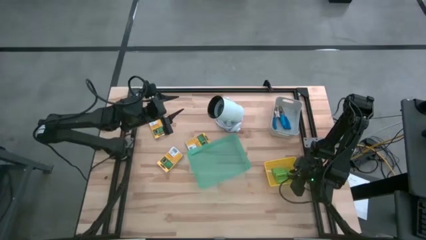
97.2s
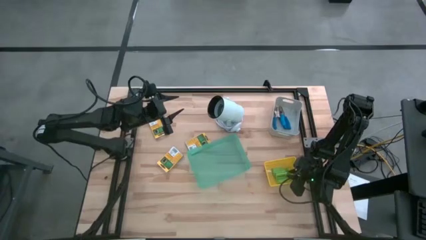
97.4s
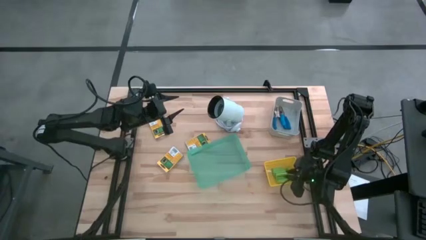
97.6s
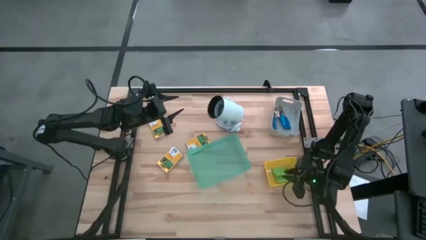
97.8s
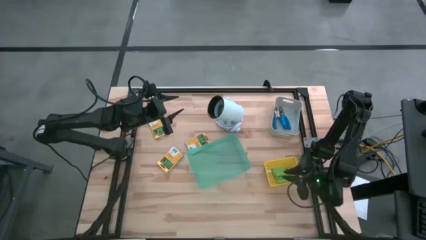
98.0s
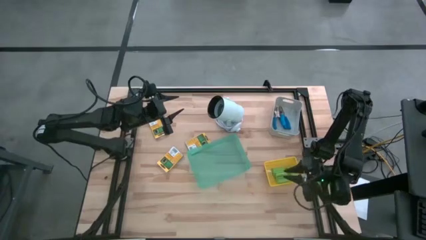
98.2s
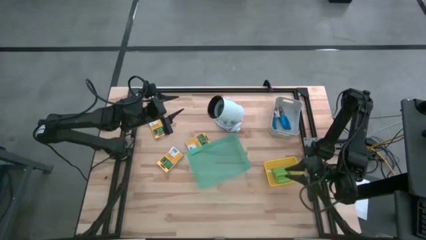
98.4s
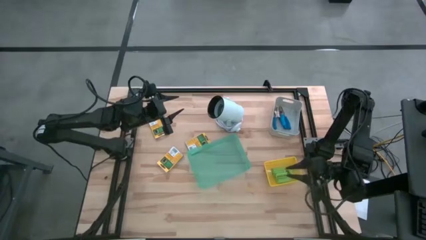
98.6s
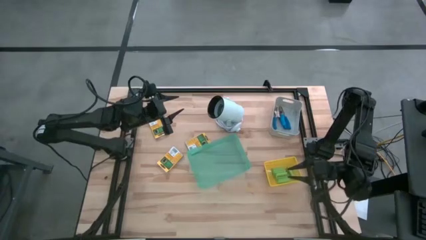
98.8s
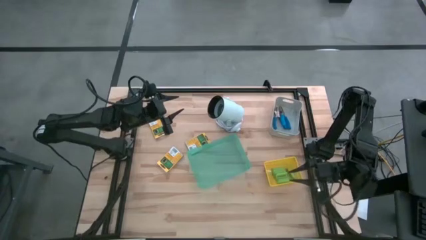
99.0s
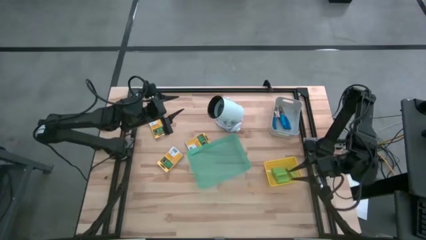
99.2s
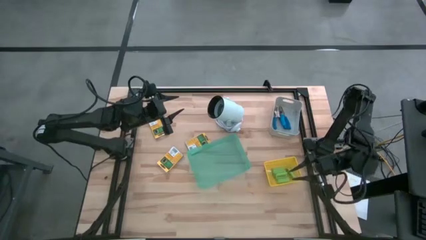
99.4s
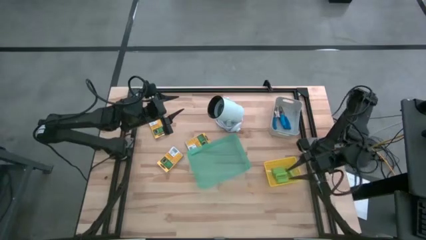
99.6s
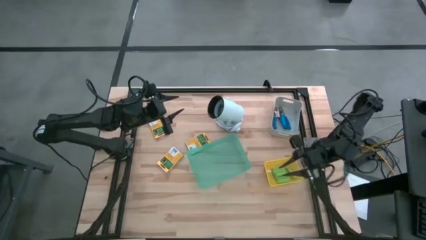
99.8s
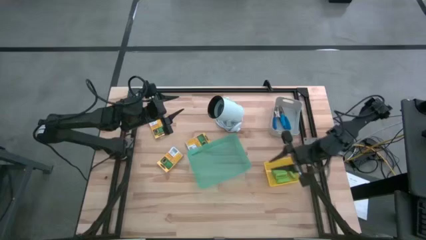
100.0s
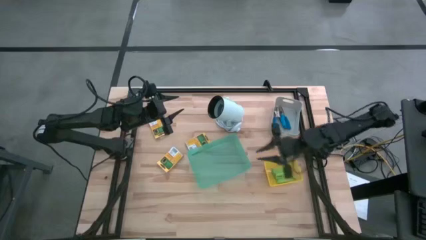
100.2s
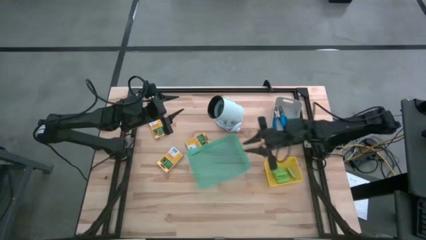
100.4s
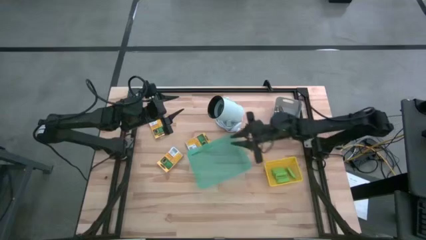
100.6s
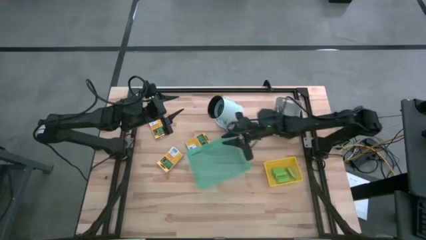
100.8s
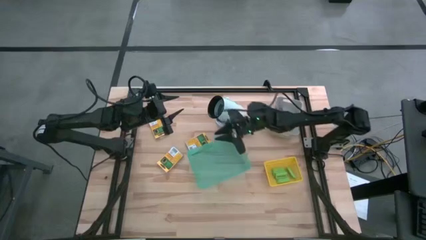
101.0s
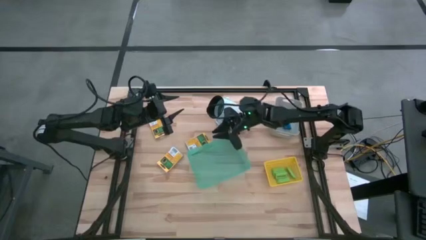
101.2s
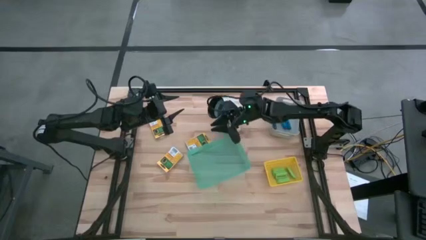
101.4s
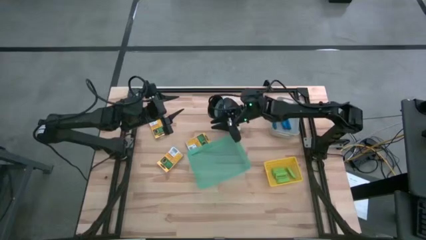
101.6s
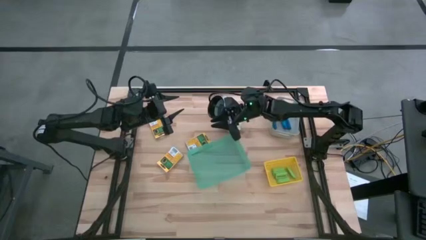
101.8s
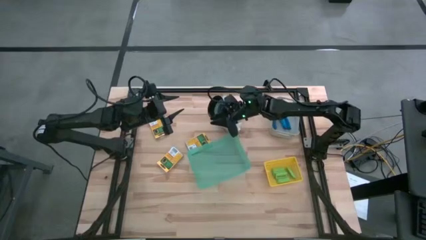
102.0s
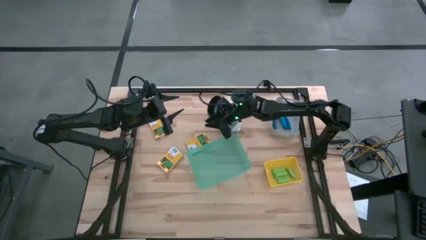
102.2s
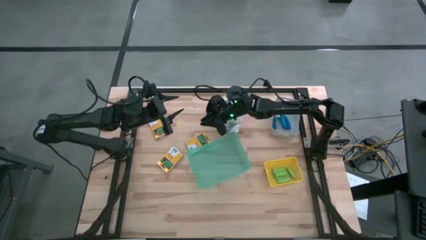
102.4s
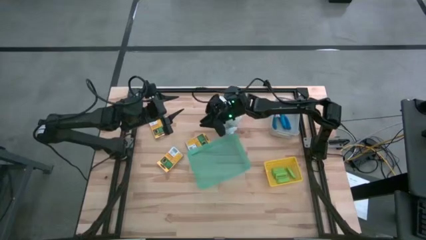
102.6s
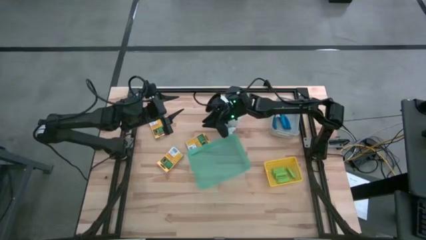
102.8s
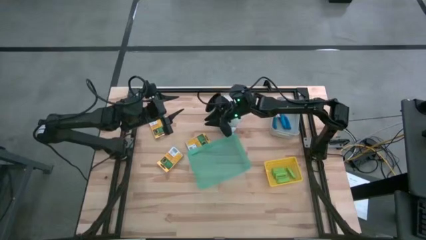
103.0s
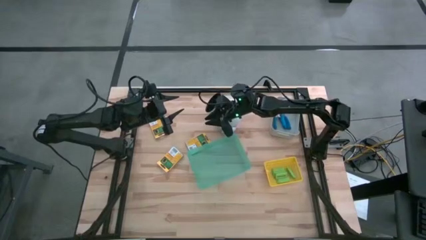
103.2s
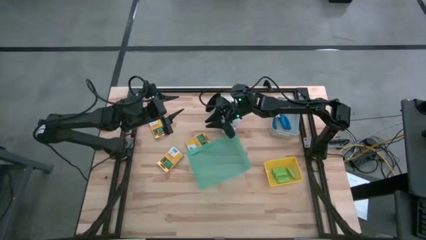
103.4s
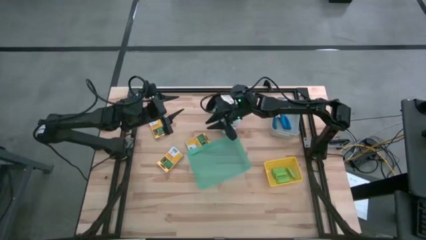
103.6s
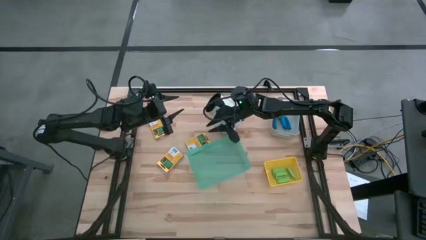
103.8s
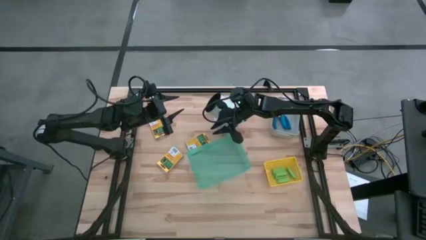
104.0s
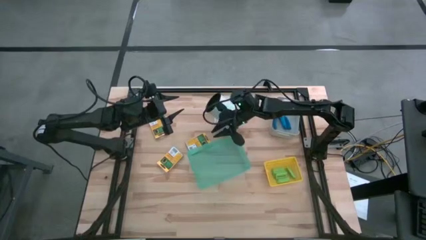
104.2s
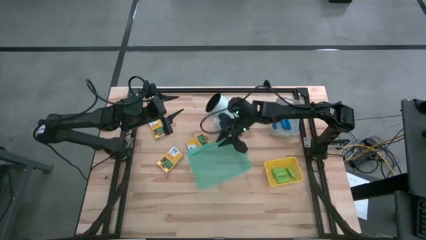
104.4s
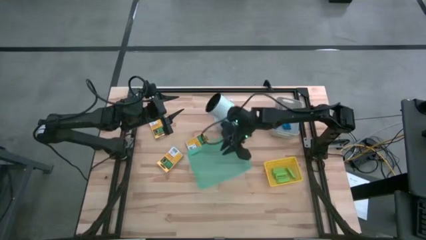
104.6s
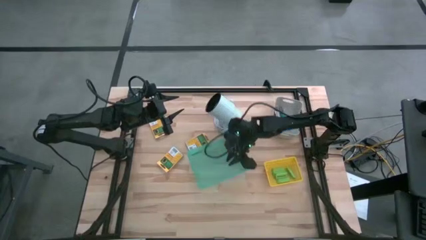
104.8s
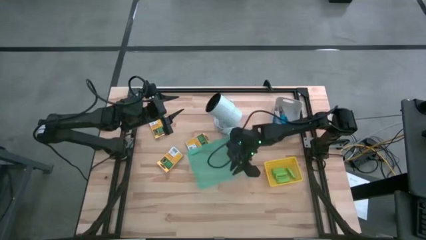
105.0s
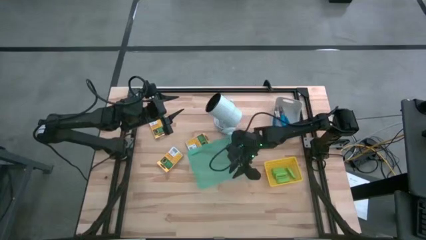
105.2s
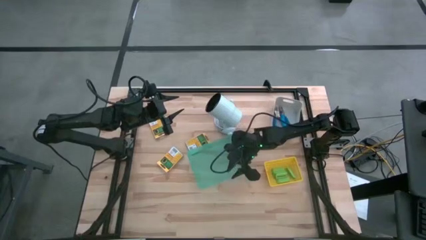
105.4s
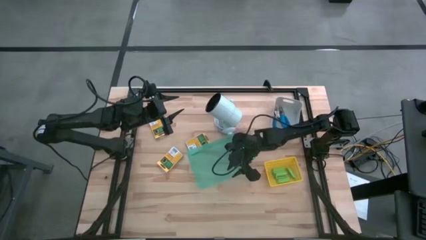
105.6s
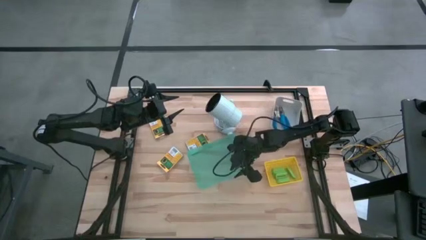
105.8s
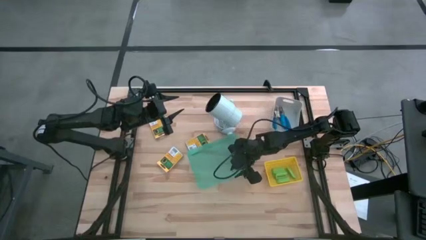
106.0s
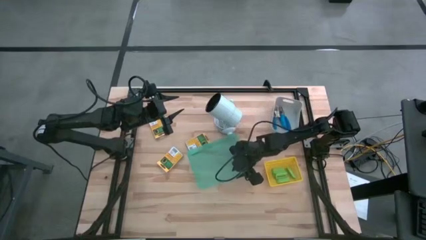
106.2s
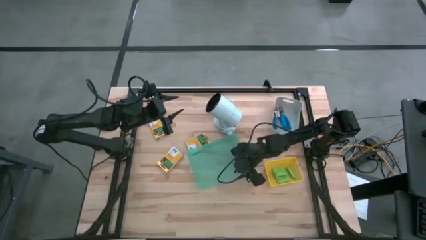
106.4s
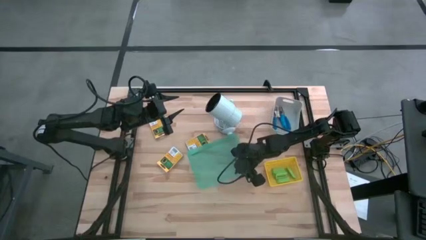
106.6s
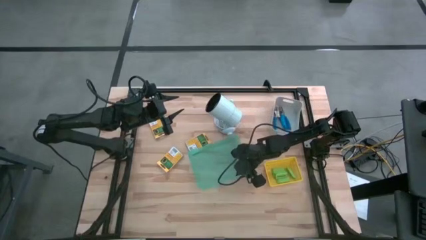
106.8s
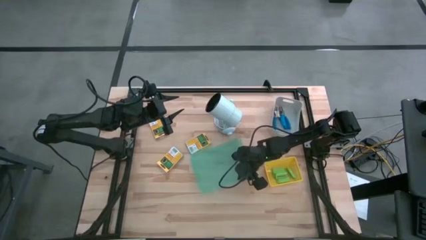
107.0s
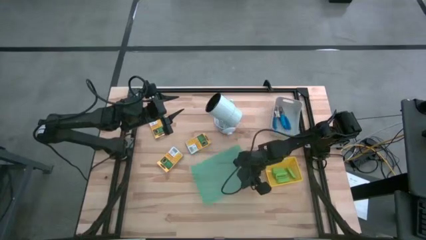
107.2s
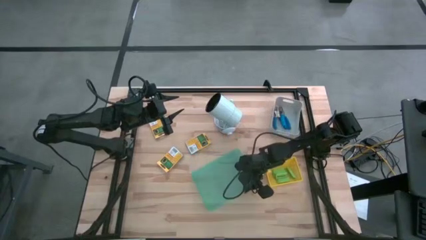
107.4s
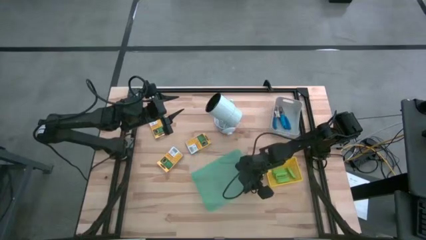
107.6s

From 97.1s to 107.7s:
Task: Pick & Place School Supplies
Adjust the green bin

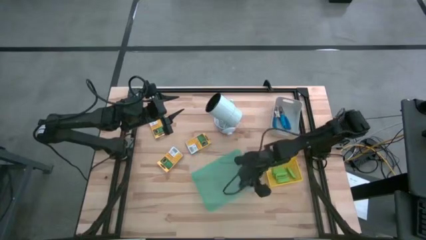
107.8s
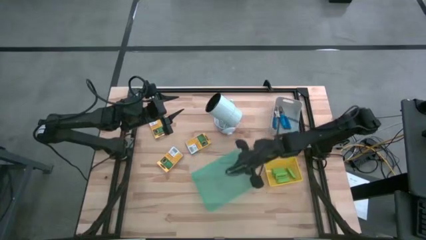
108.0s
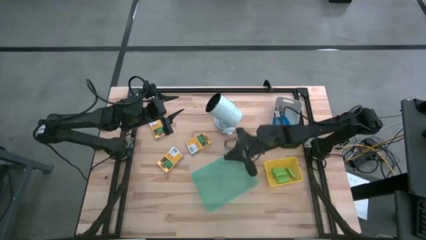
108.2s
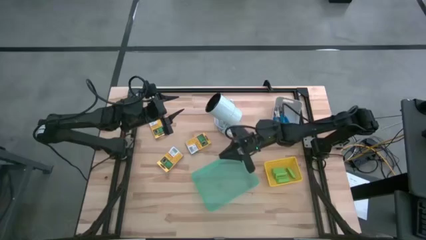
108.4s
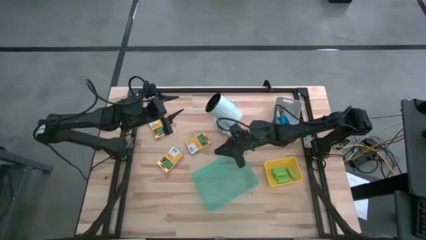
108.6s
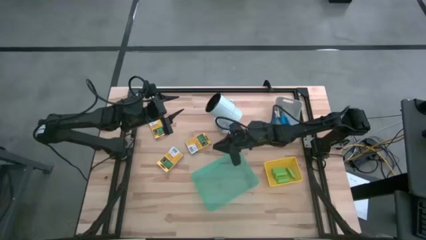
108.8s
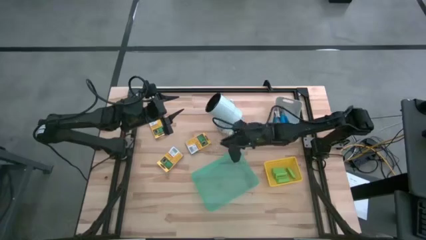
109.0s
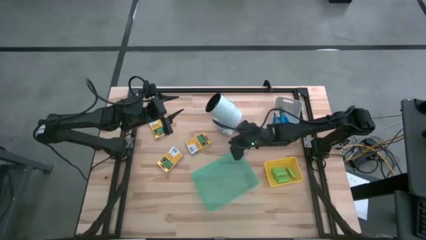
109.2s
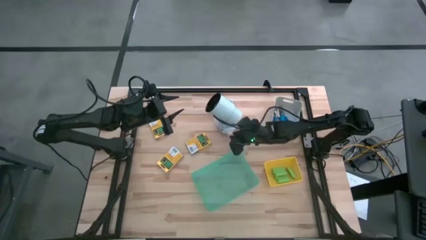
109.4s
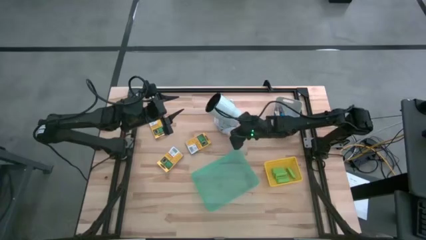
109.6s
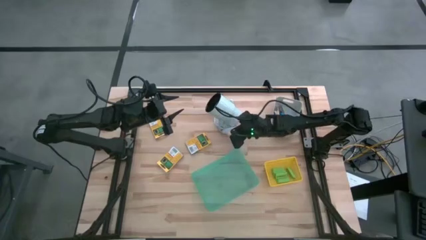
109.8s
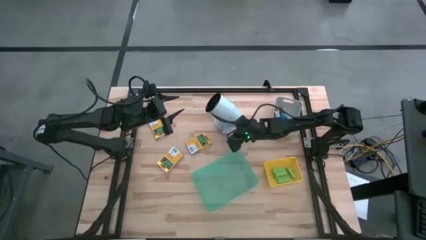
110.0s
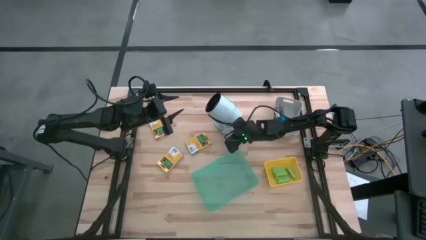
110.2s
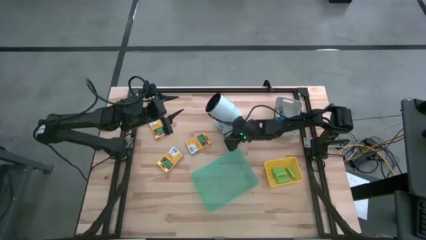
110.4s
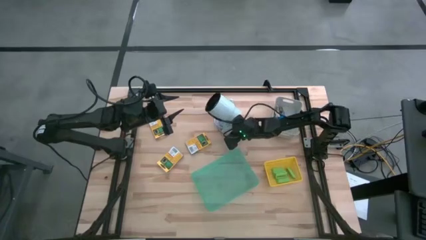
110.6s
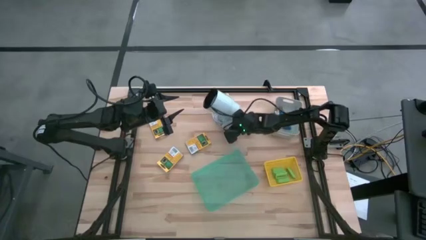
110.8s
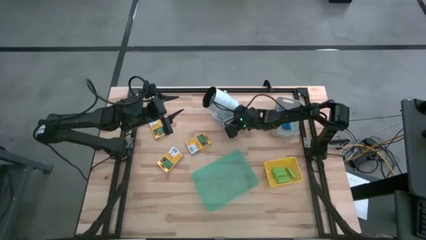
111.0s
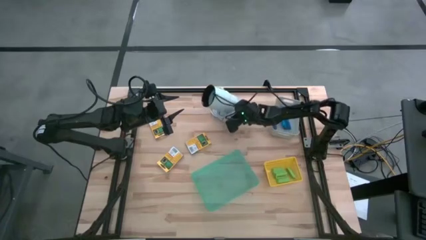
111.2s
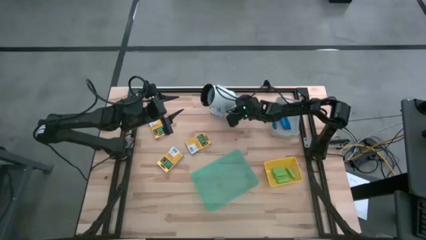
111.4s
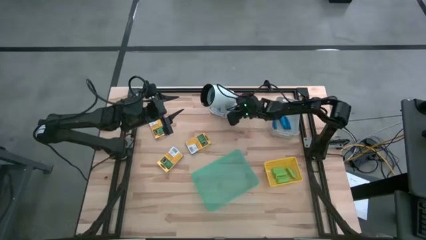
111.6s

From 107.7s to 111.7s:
Adjust the white telescope
